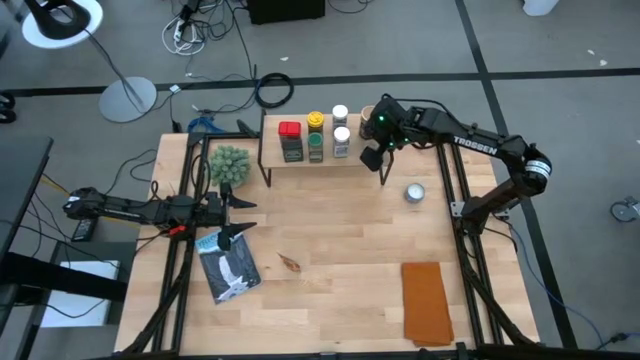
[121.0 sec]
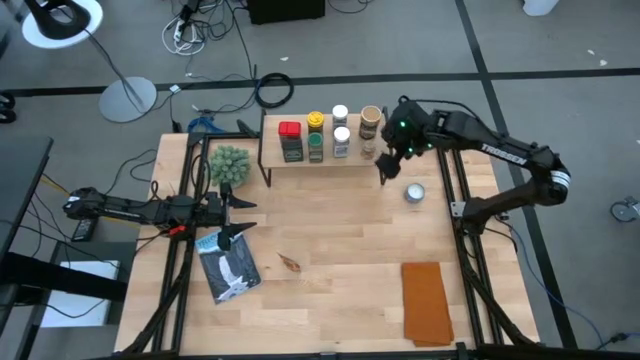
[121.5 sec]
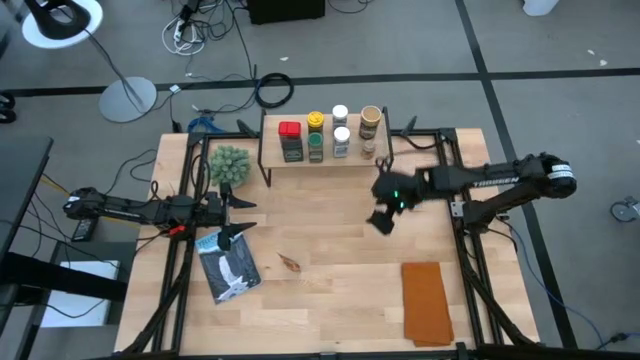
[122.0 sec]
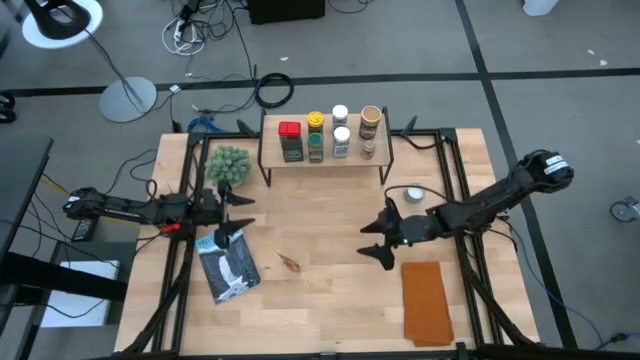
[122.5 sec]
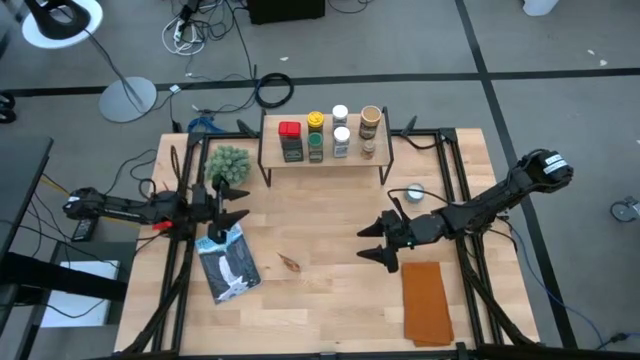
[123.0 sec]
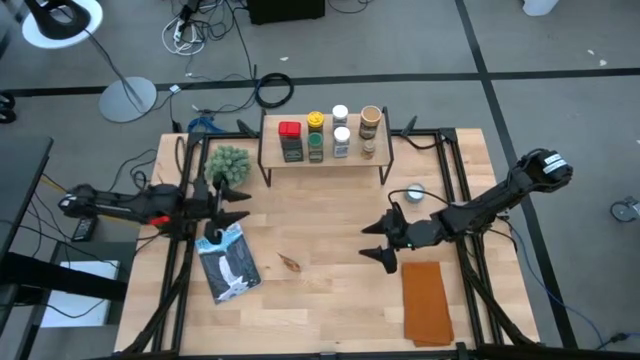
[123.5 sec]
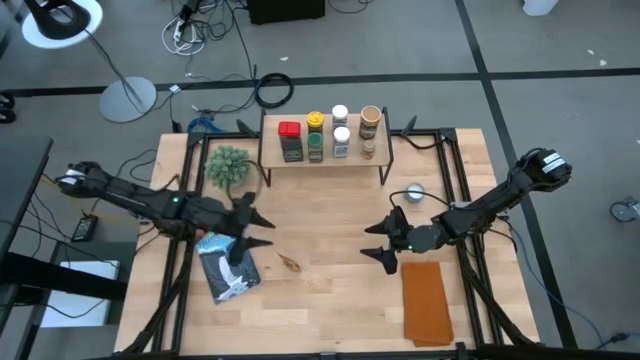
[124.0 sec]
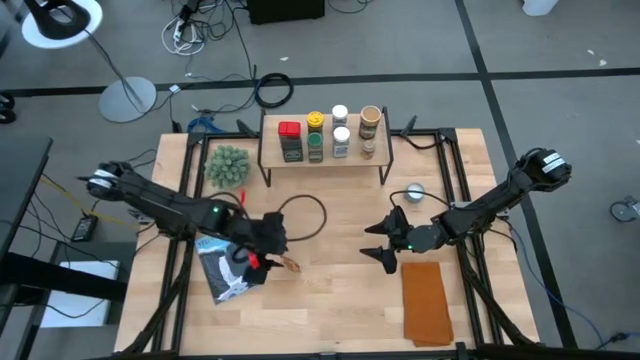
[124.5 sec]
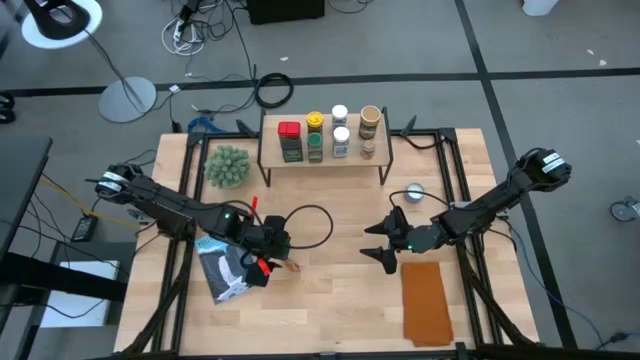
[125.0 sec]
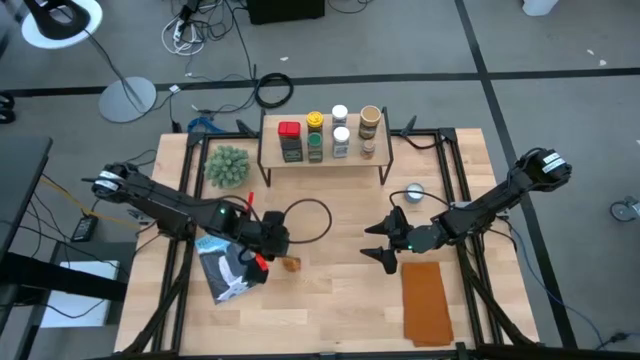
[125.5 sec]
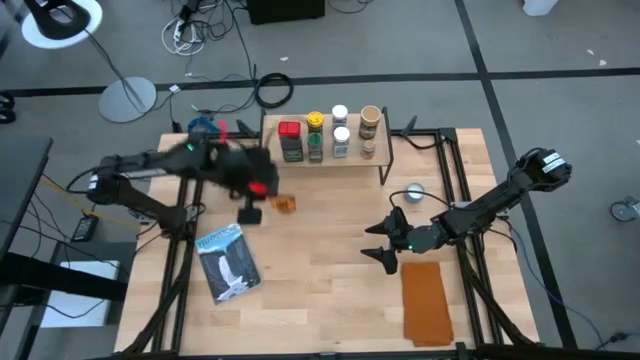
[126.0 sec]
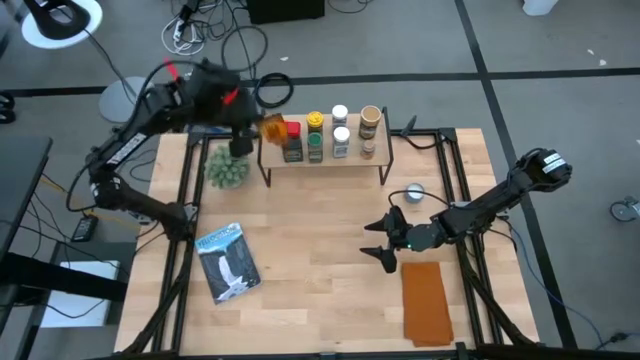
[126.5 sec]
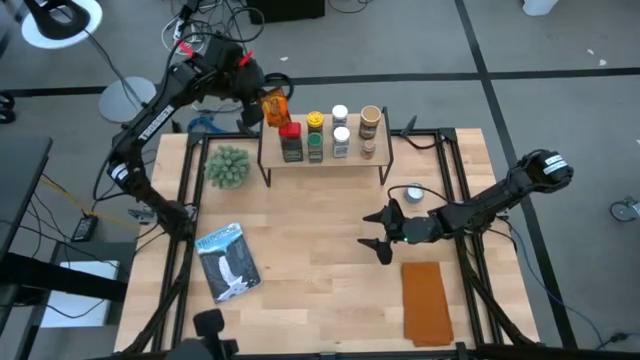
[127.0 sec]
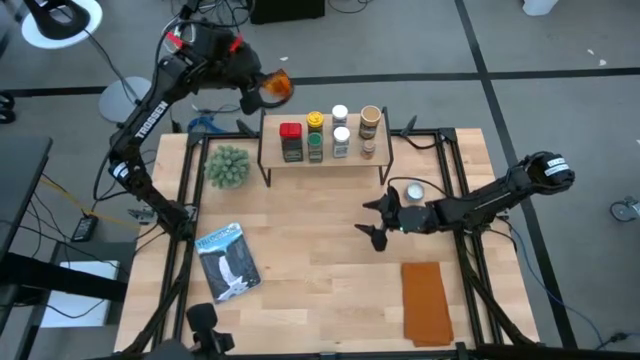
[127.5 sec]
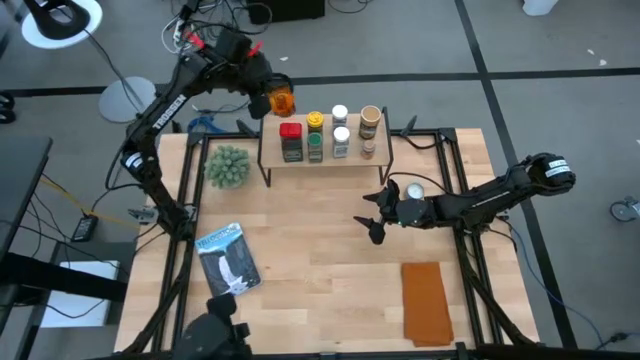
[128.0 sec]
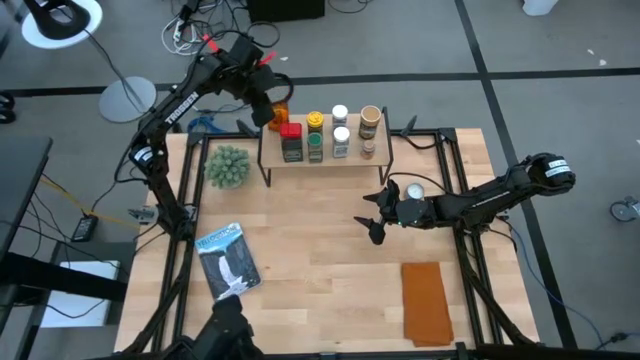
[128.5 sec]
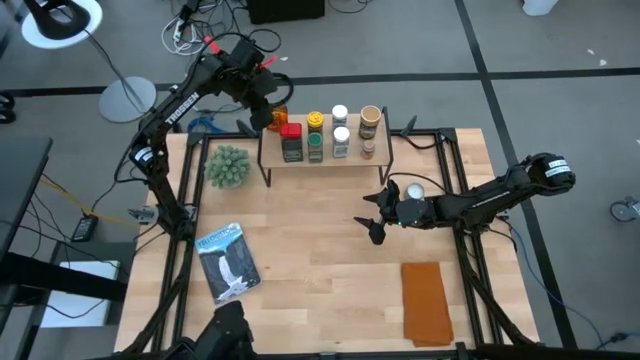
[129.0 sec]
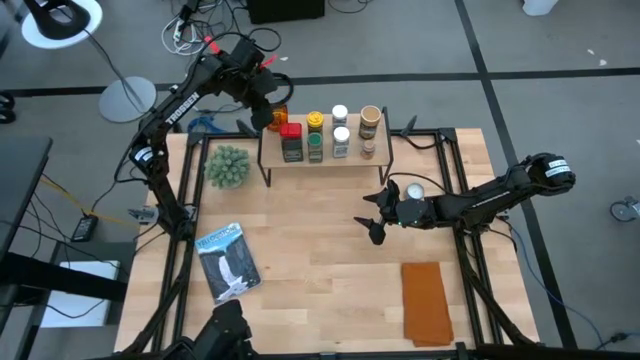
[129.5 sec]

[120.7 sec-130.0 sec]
Task: Shelf spices
Put the orange seasoning pack on the shelf

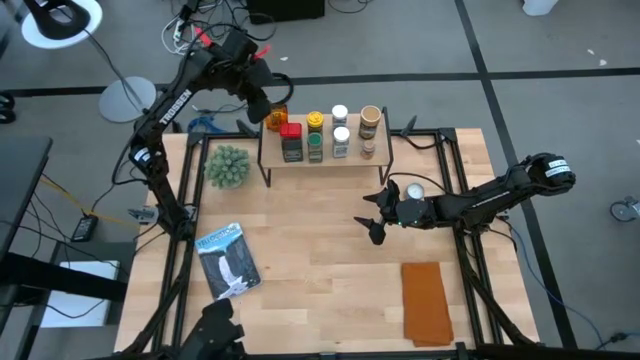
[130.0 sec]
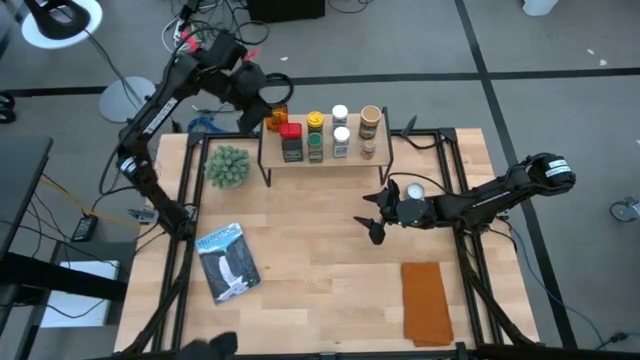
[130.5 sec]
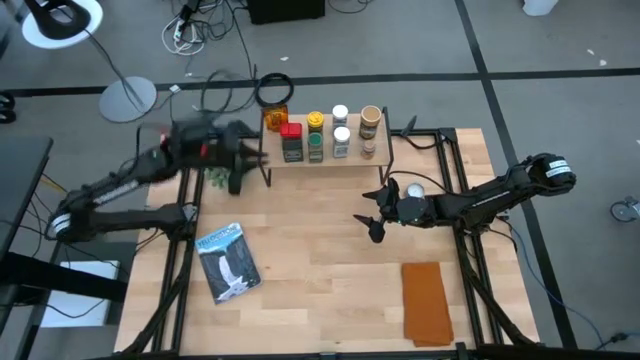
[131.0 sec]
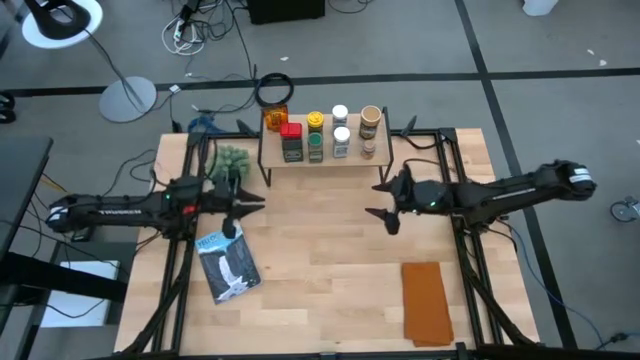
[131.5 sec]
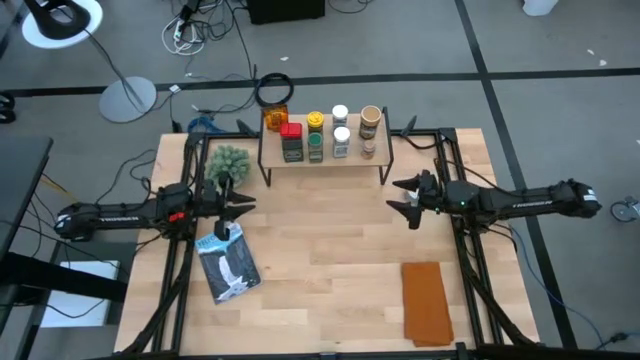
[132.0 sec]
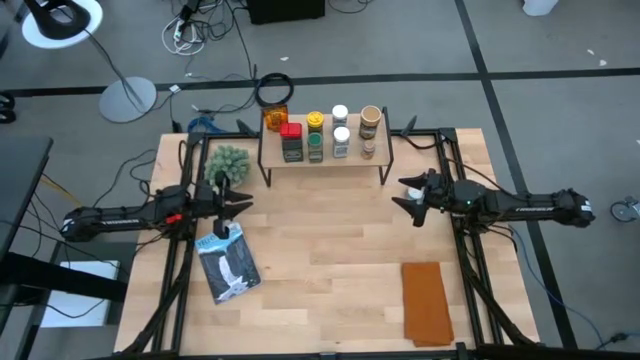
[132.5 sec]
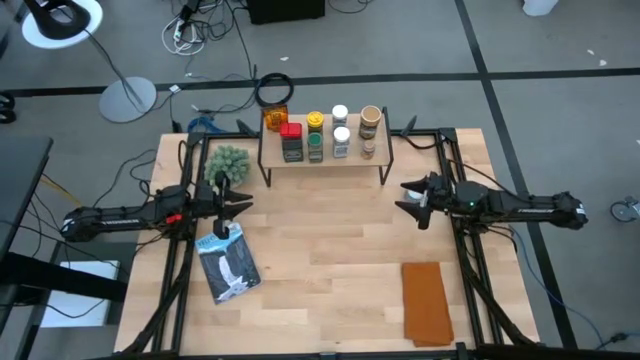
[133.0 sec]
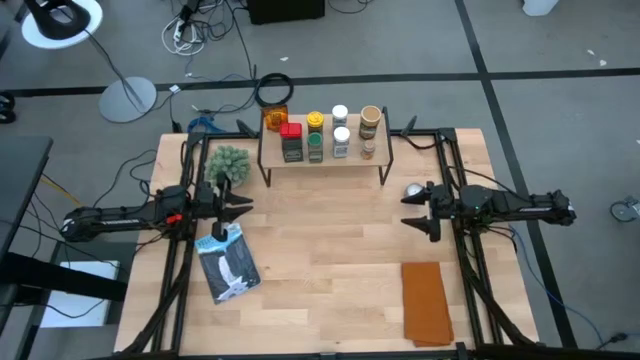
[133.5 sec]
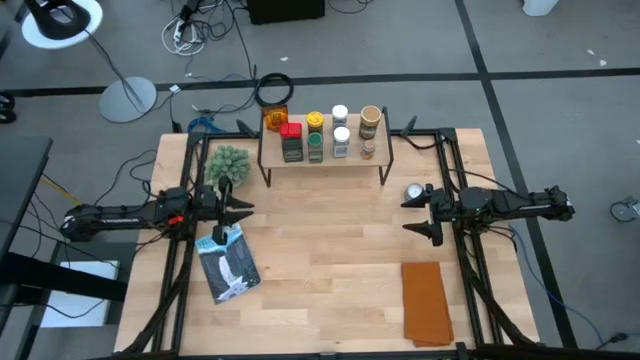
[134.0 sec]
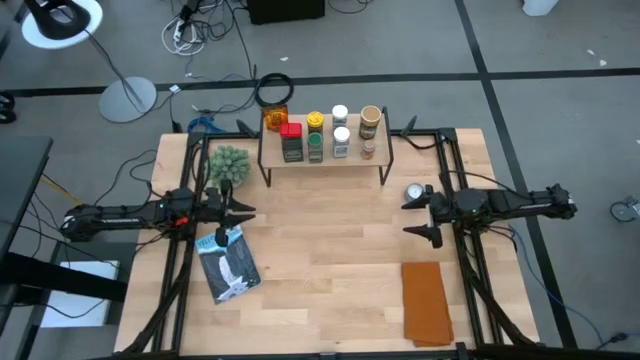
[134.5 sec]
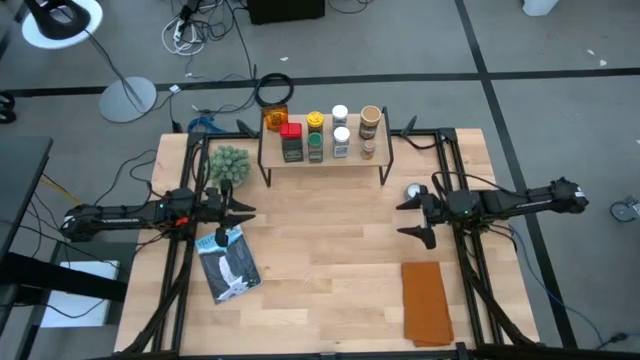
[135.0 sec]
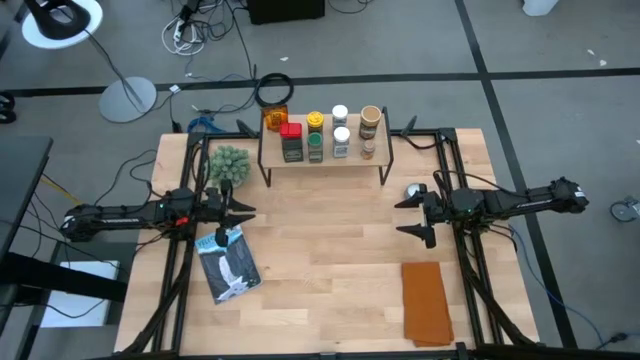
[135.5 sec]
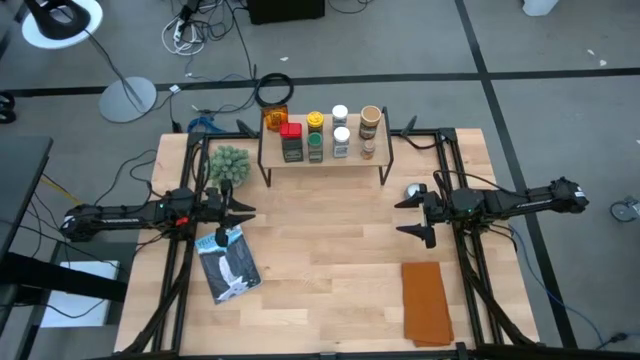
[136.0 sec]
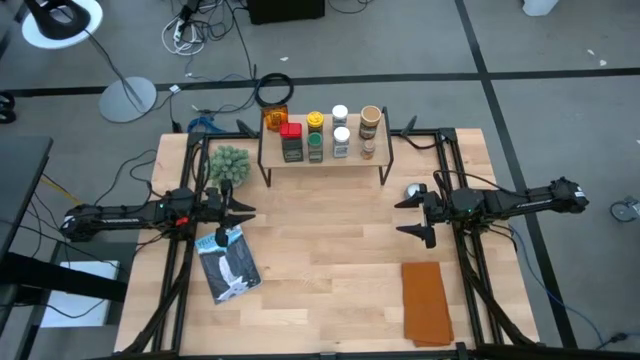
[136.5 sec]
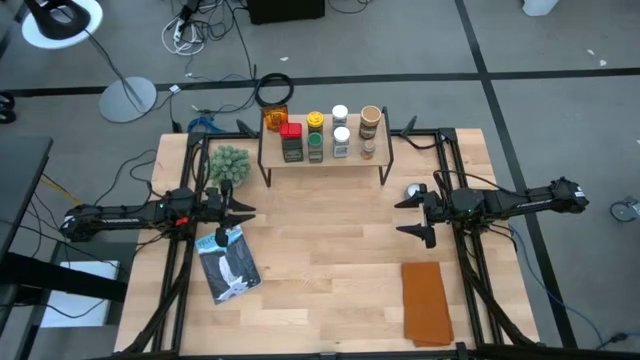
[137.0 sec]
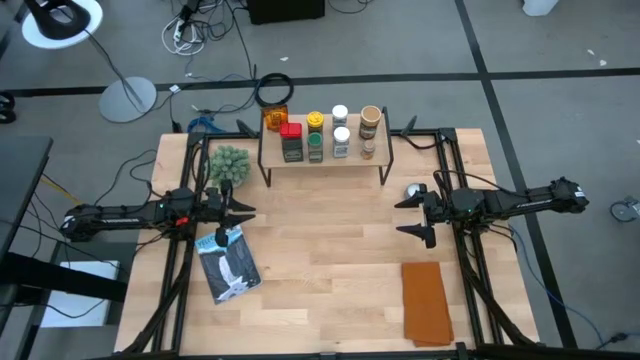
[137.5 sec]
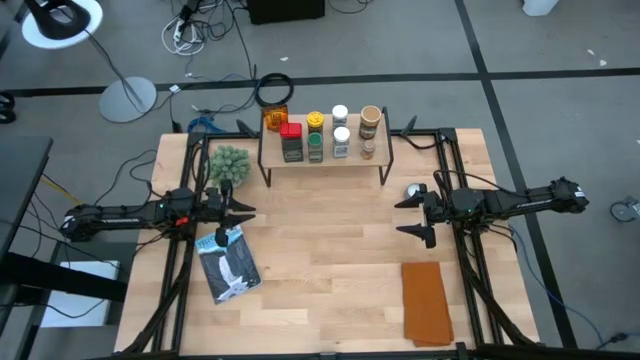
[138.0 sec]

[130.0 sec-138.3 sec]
Return to Home Position

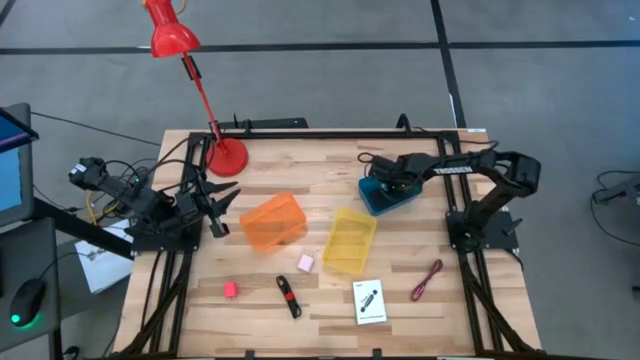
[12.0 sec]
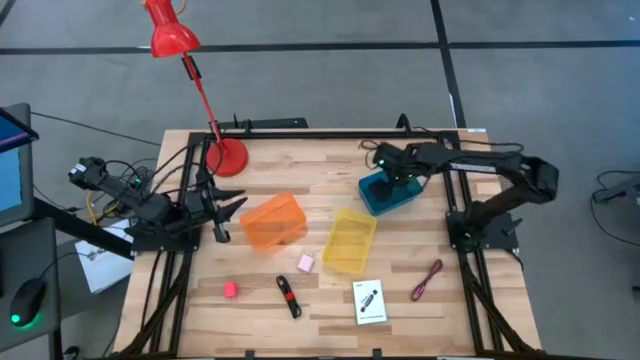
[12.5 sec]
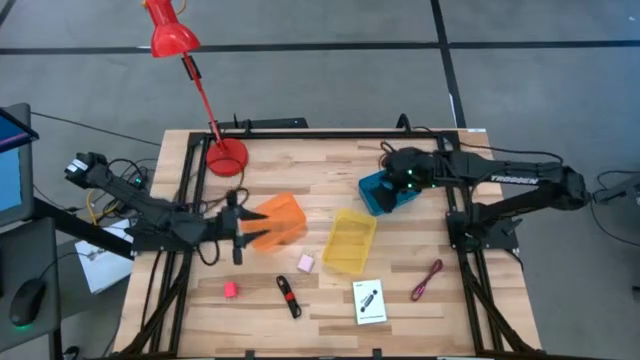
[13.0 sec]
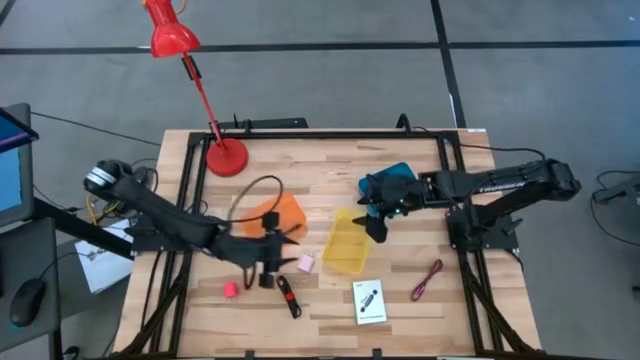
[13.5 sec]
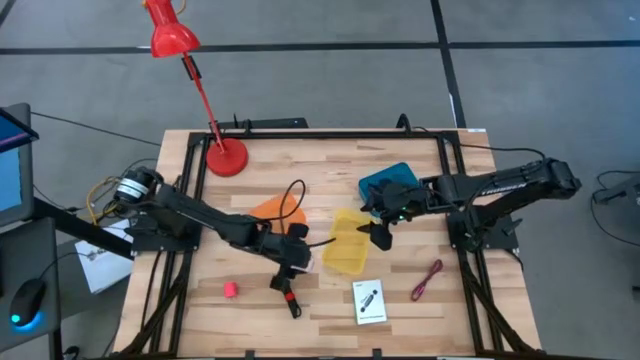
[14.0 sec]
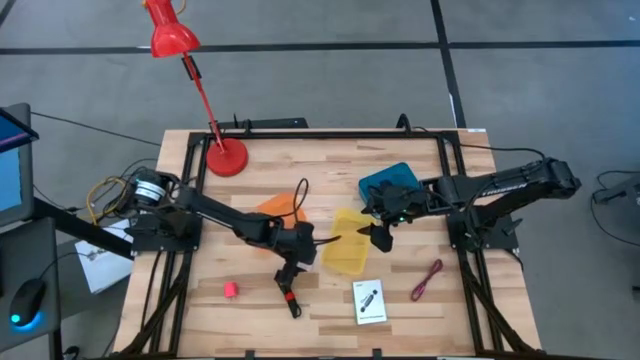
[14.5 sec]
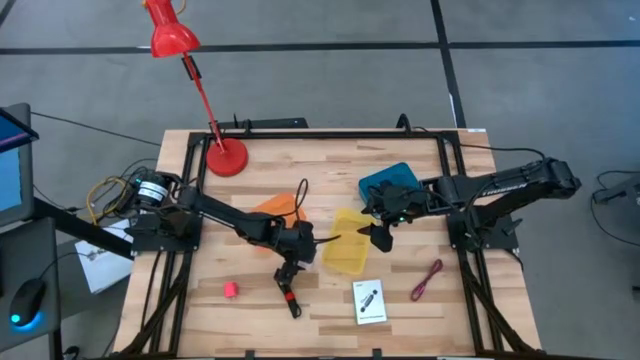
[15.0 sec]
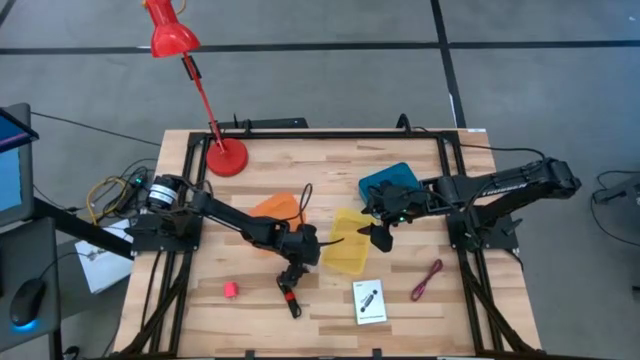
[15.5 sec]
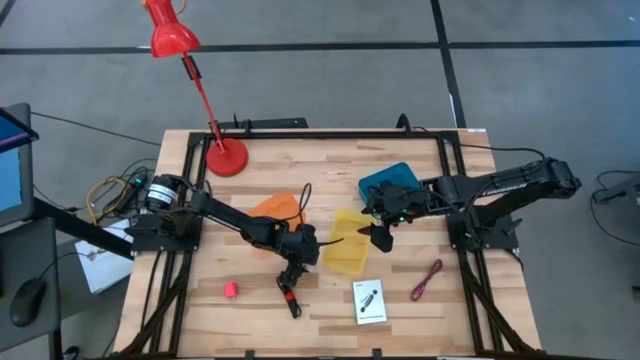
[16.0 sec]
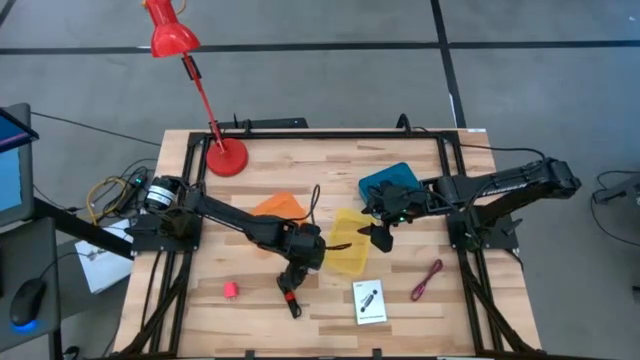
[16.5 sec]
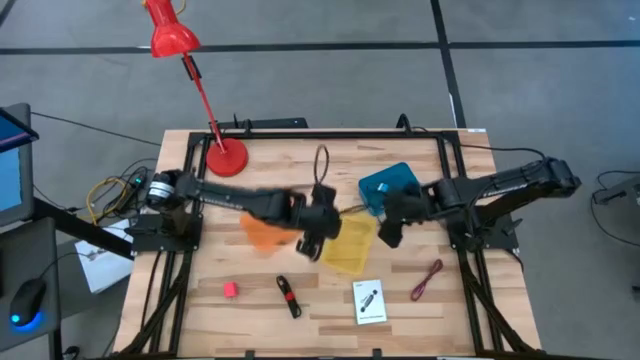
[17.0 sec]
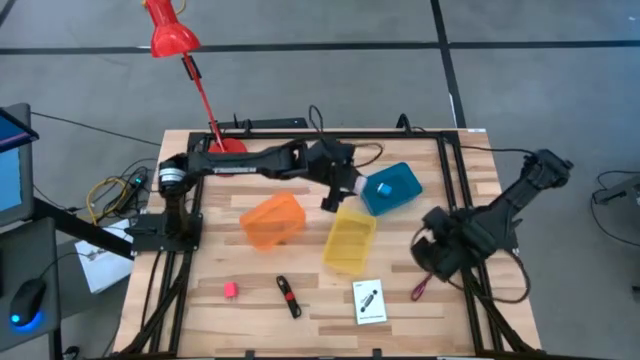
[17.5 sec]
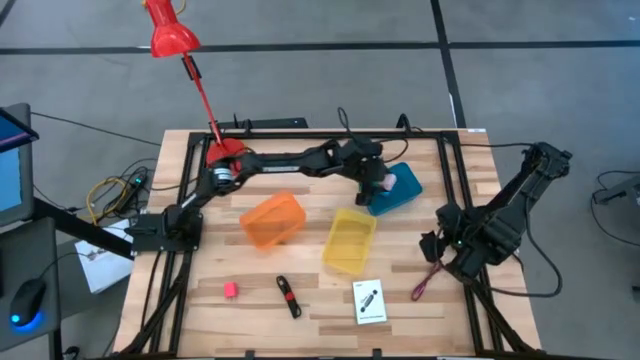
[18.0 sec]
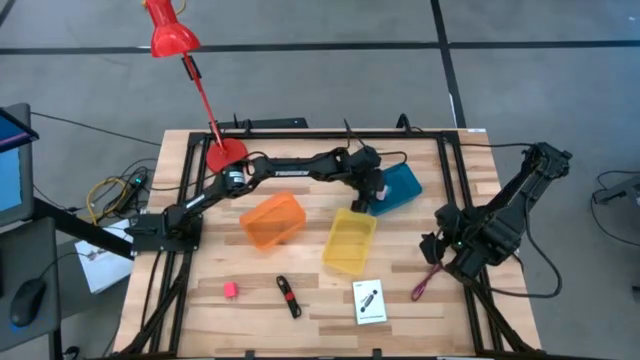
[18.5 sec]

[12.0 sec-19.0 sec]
Task: Pick and place items into bin
Put the white charger adapter into the blue bin
